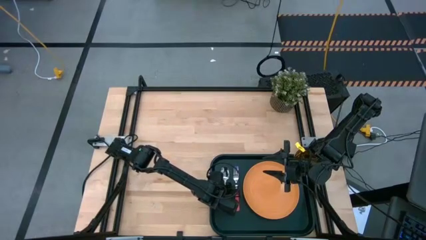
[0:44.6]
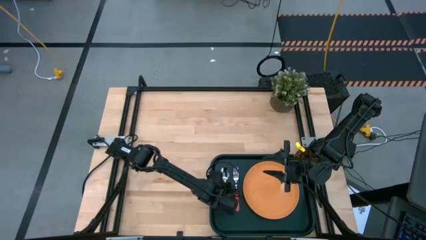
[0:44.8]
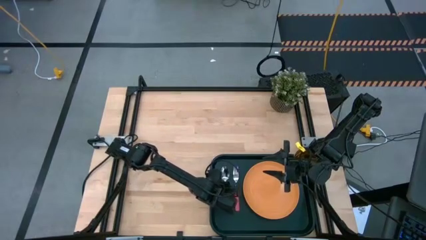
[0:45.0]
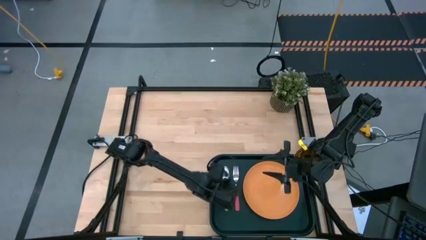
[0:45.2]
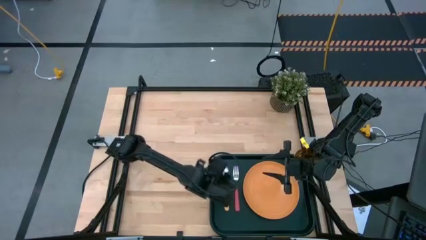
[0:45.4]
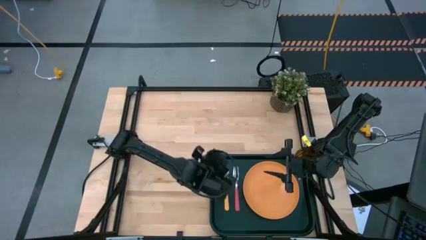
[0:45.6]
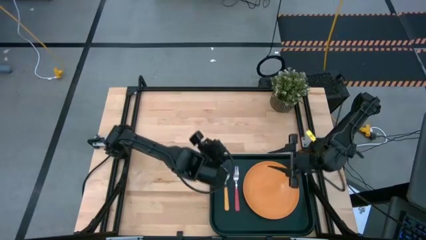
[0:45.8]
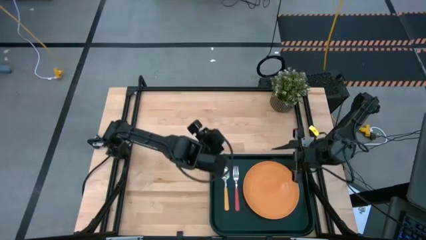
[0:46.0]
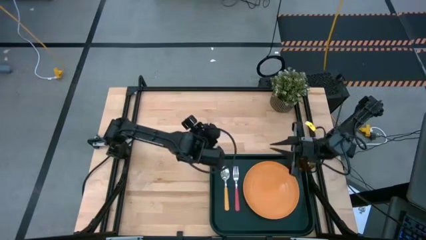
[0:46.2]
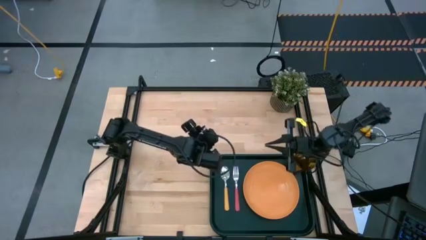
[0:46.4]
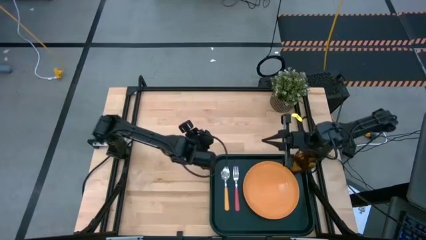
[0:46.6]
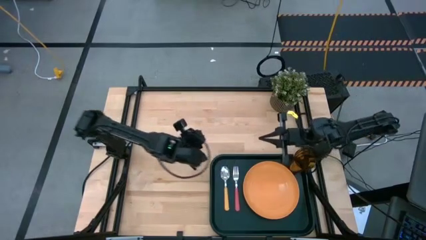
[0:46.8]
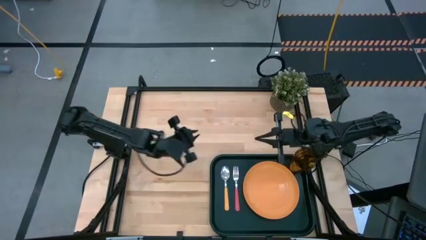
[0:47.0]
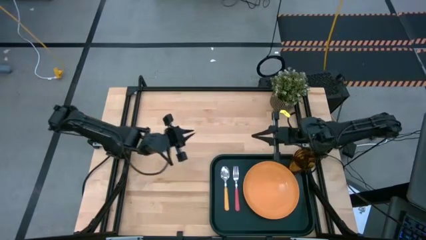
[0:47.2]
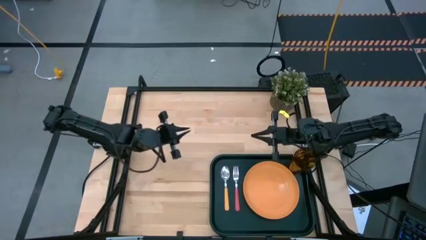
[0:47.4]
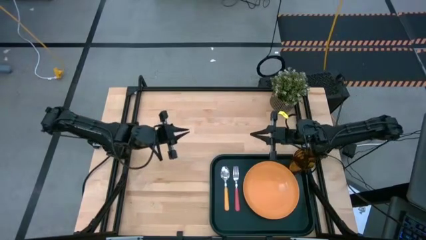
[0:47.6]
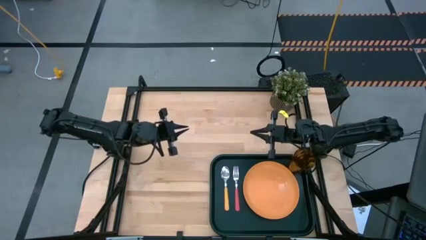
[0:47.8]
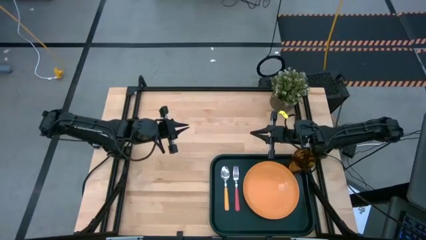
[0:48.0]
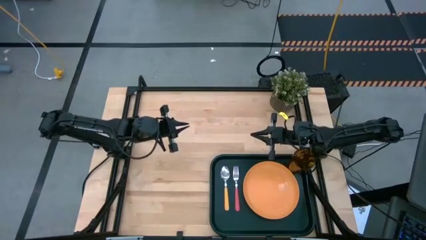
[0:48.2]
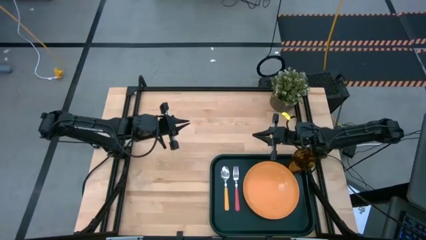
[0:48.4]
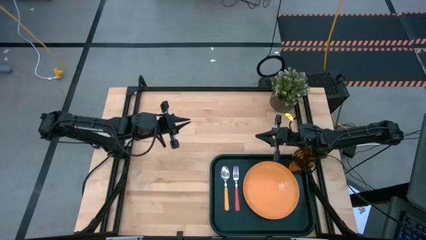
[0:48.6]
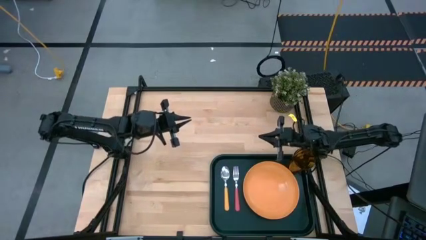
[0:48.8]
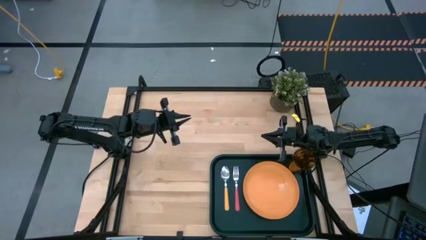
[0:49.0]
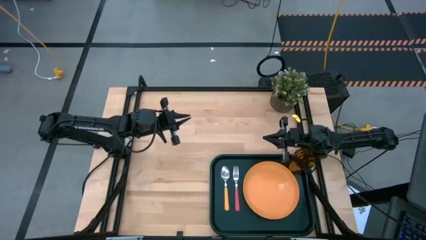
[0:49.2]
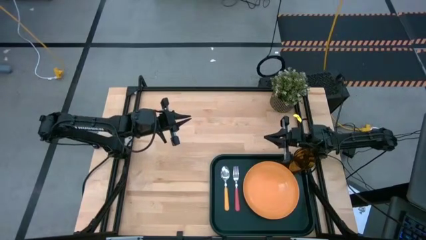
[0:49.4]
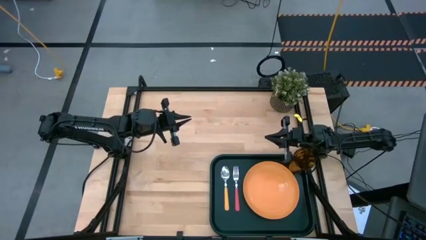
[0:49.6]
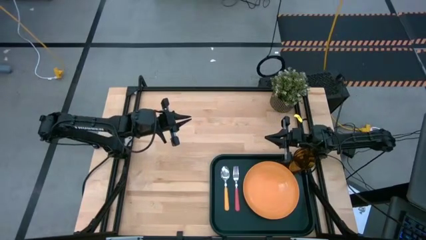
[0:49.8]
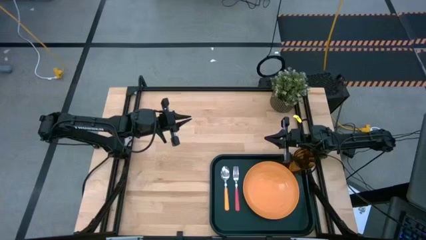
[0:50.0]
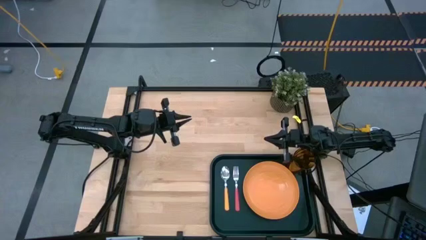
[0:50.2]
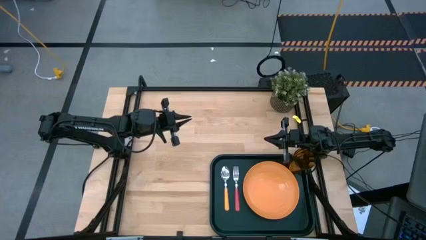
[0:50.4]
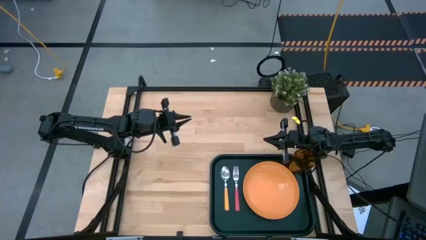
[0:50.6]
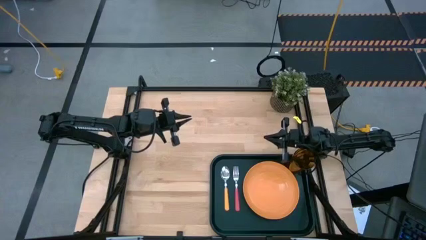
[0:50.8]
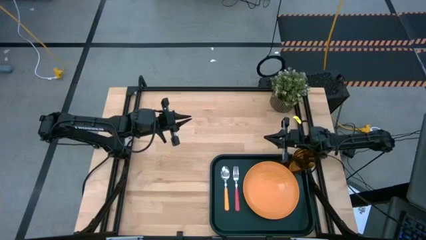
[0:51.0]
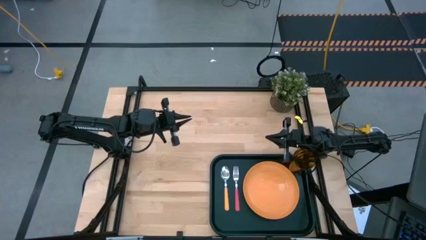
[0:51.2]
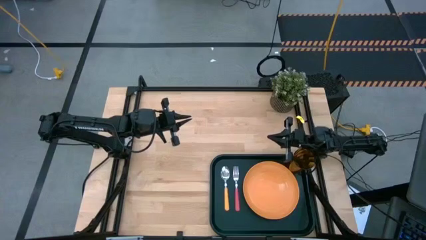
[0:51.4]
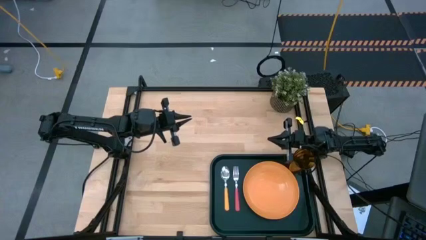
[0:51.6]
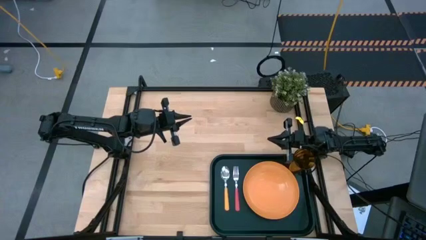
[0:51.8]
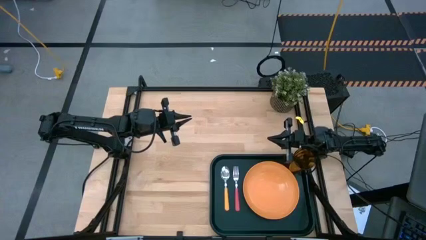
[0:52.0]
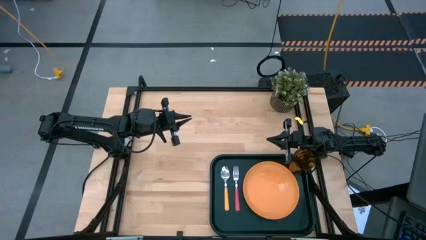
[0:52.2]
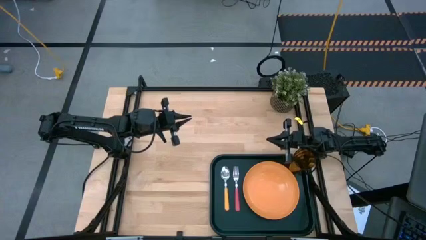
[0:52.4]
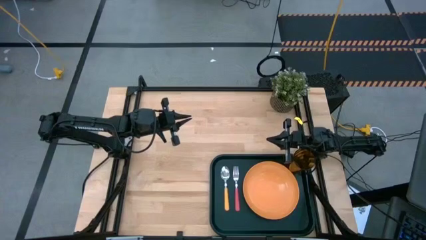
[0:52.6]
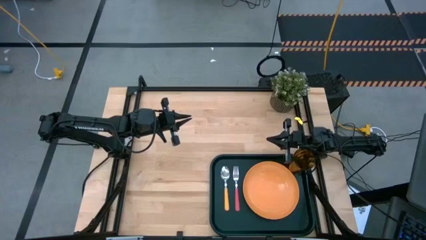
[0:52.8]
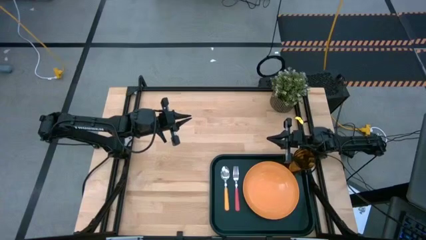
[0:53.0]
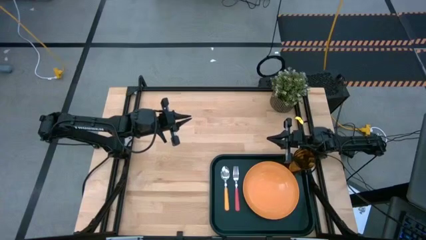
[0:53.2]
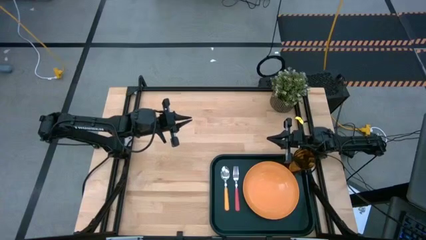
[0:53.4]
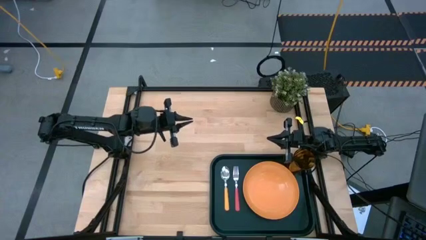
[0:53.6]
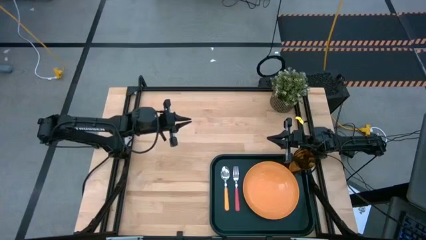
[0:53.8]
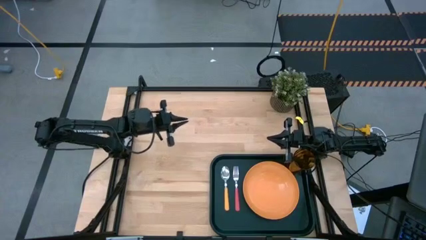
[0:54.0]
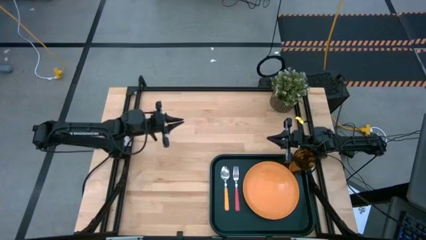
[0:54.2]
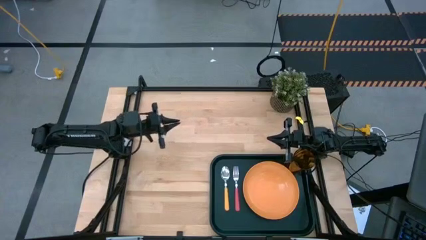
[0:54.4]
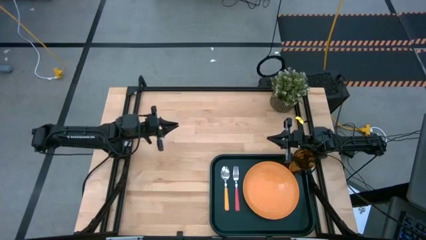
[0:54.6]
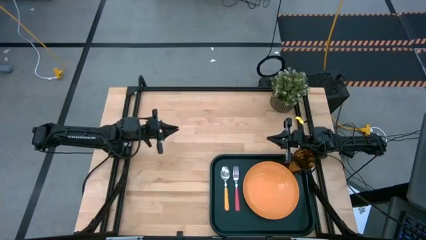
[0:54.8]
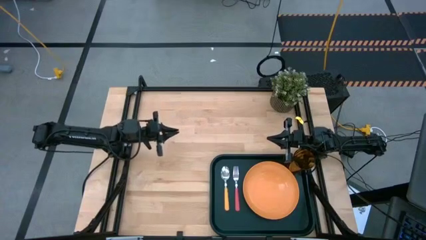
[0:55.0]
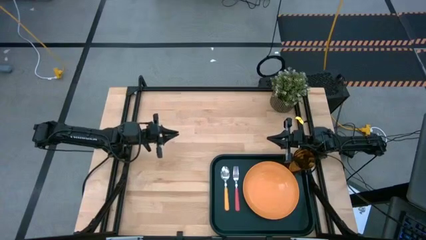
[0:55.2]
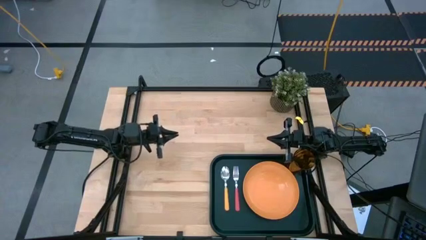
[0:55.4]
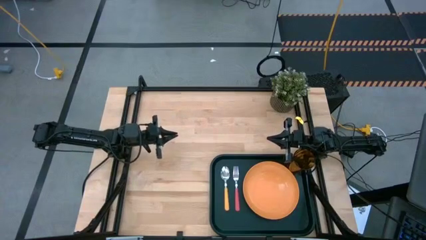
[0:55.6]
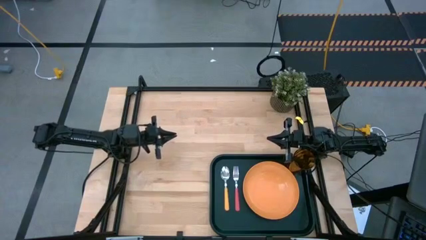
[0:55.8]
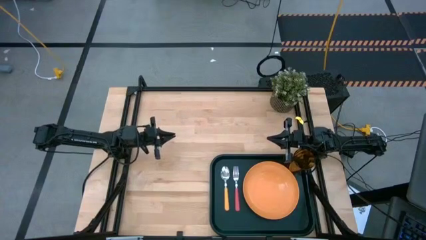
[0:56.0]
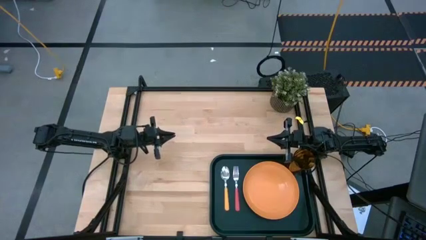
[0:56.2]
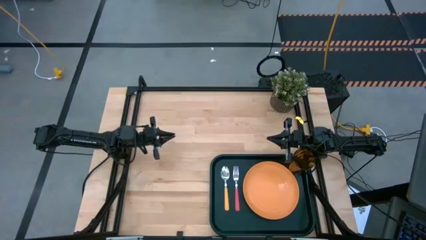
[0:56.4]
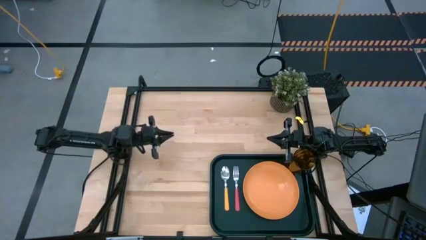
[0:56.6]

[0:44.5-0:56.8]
Task: Pick and place plate/cup/fork/spoon on tray
Return to Home Position

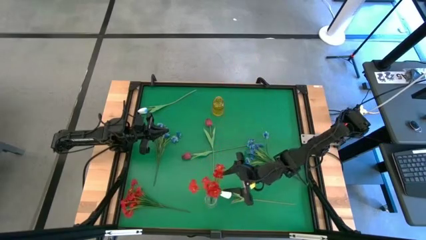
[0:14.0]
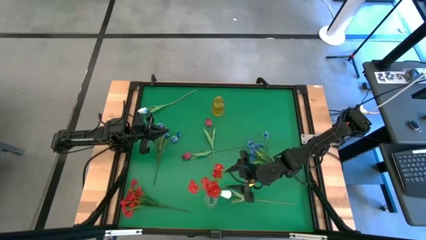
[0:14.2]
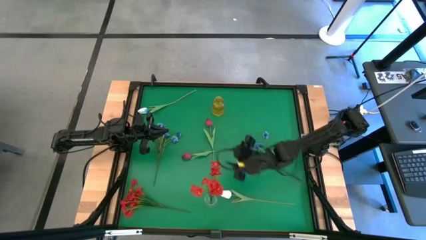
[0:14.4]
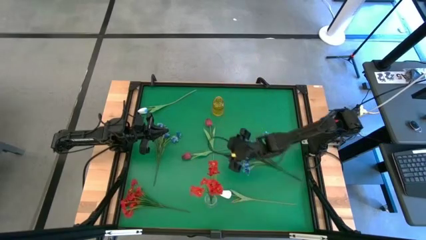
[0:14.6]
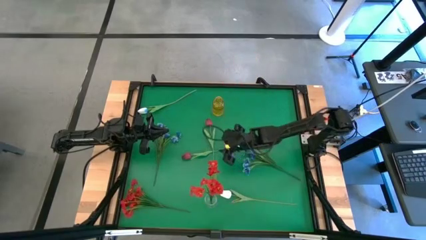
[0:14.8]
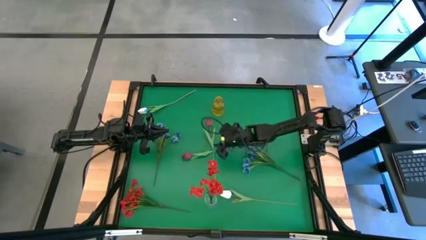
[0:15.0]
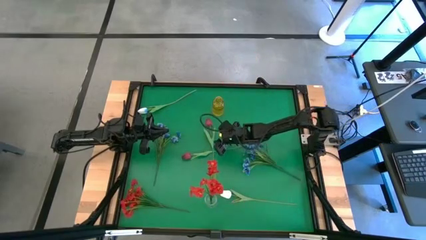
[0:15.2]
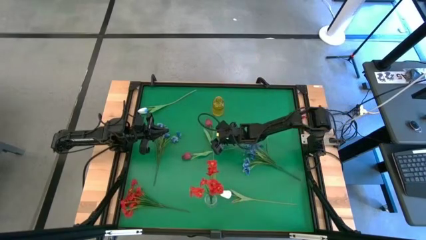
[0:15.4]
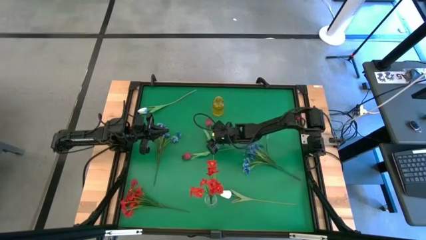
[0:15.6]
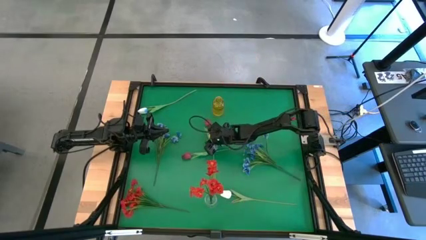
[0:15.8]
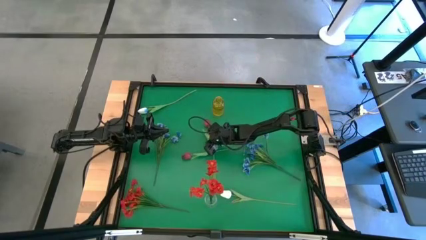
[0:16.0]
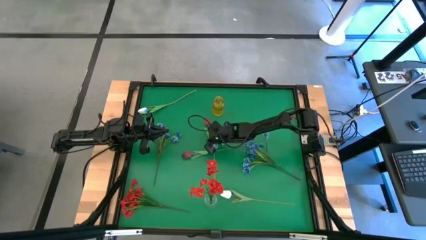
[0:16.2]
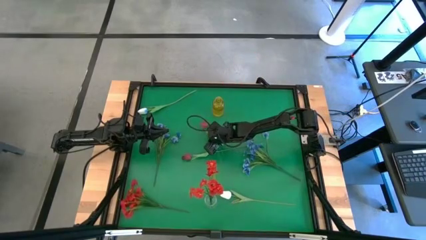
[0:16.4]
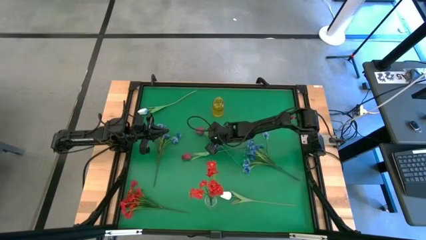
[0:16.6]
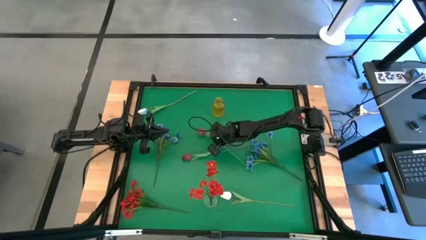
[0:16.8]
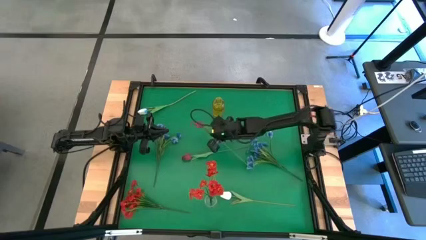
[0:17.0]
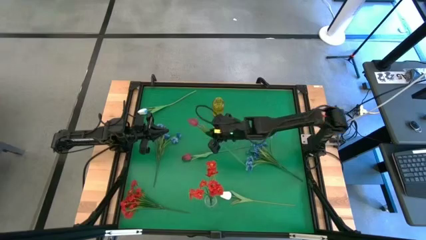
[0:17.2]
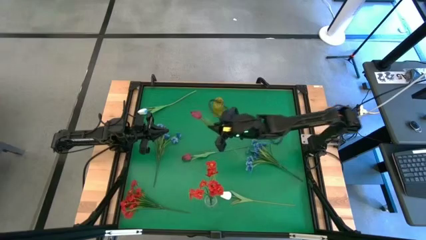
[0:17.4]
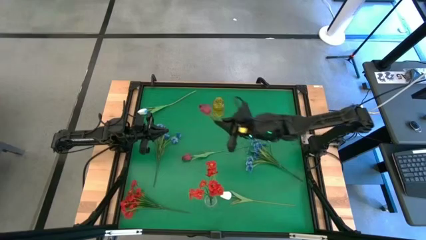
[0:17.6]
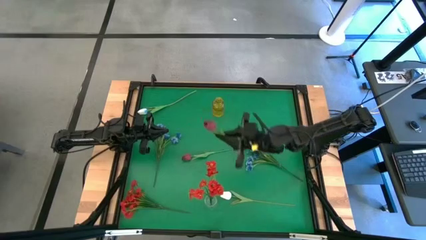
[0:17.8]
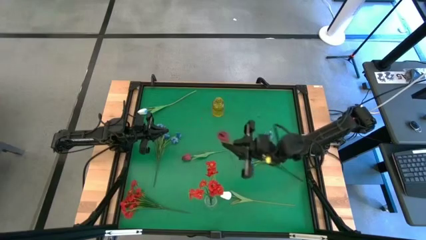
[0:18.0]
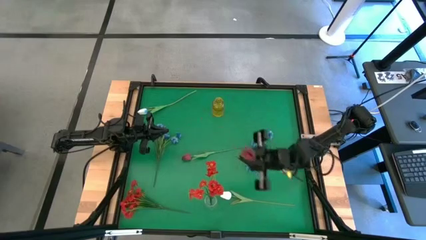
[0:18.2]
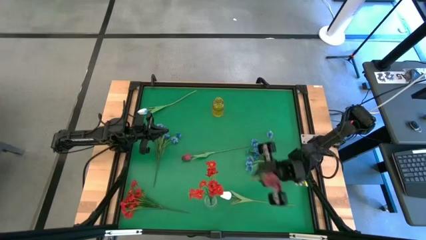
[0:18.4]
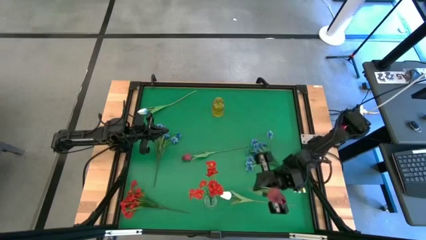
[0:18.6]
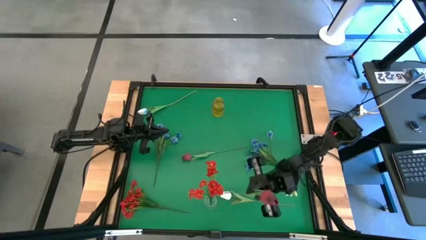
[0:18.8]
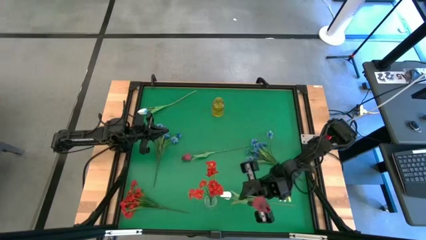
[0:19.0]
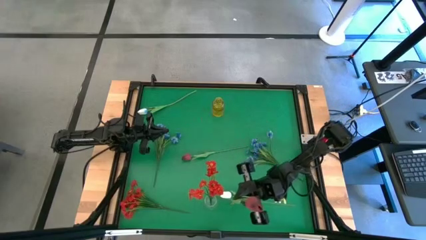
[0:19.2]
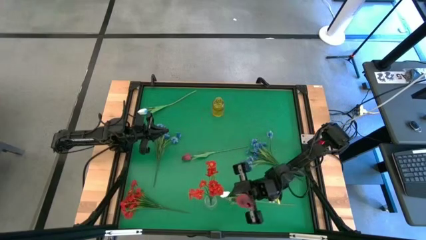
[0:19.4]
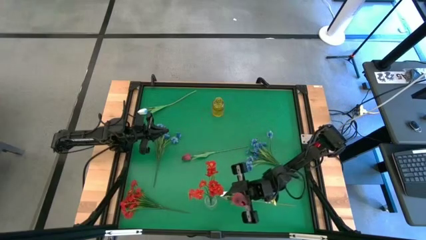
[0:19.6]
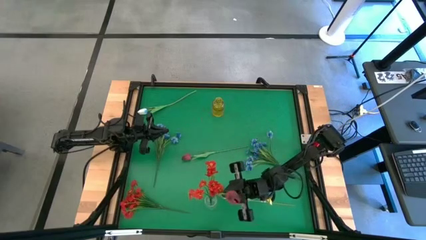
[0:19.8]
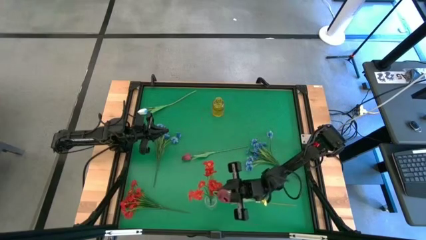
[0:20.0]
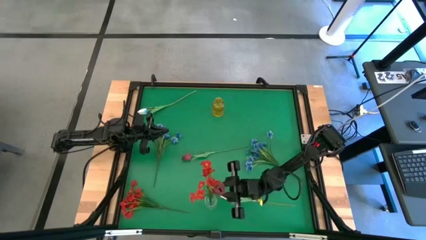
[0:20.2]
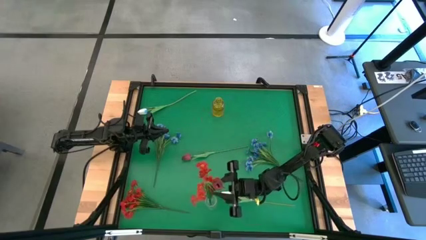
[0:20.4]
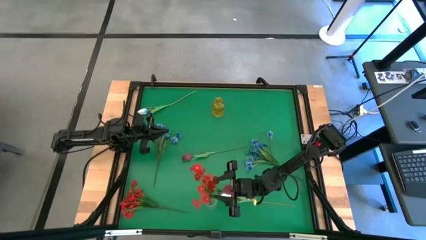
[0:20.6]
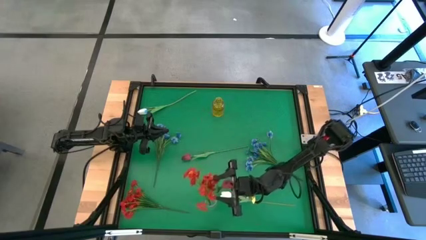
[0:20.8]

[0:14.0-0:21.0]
Task: Sort flowers into vase by color
Put the top red flower into the transparent vase
